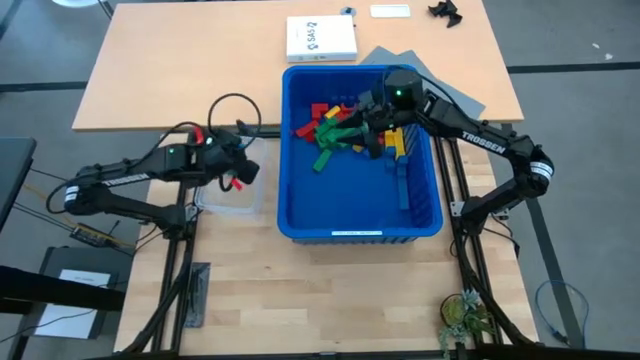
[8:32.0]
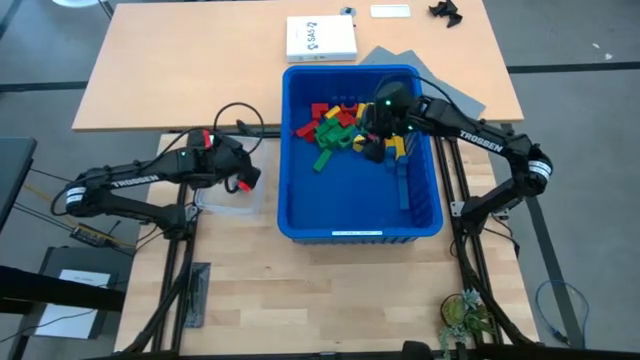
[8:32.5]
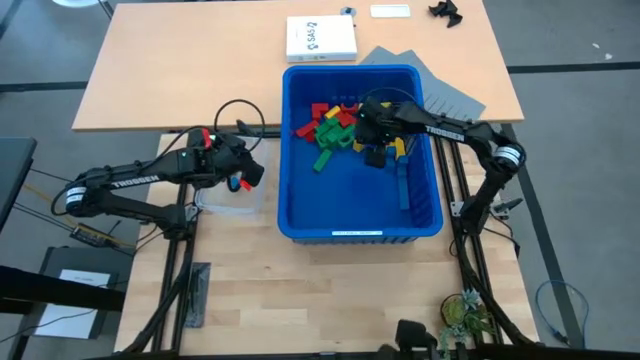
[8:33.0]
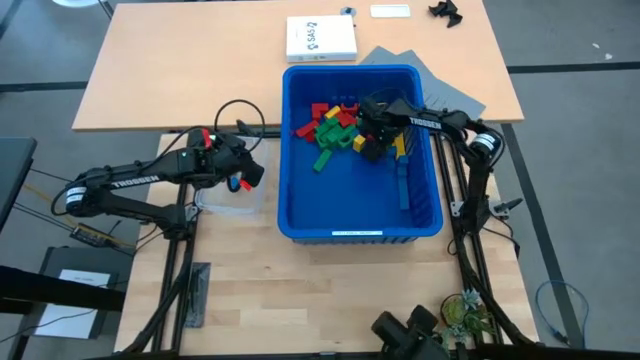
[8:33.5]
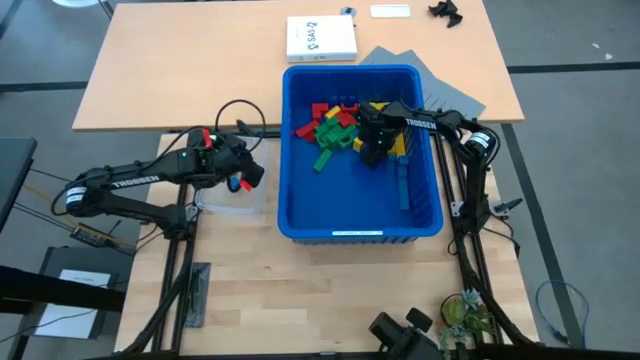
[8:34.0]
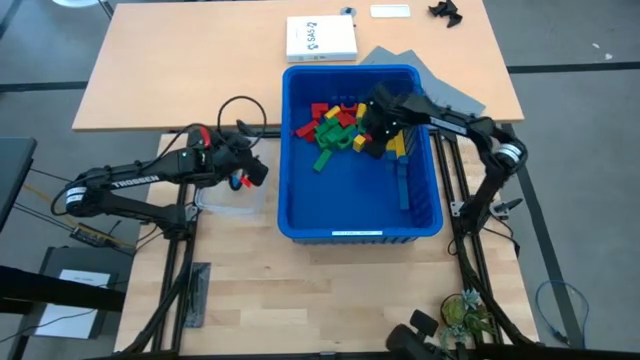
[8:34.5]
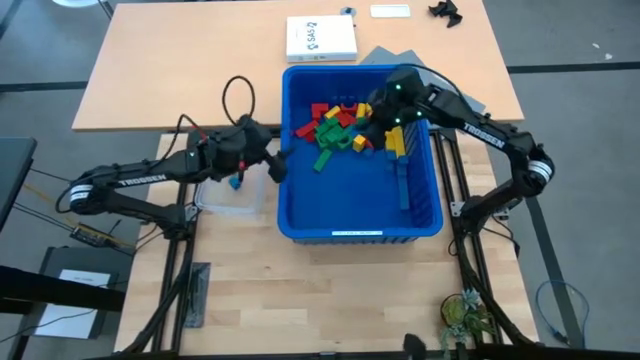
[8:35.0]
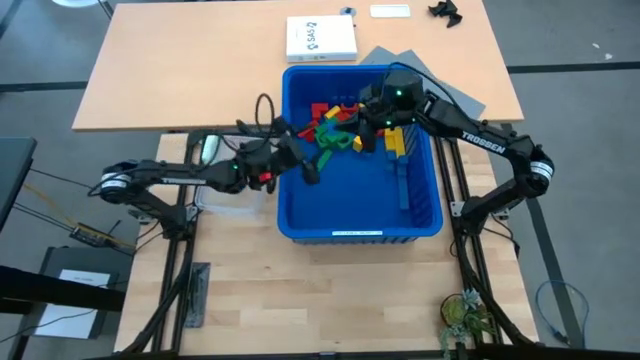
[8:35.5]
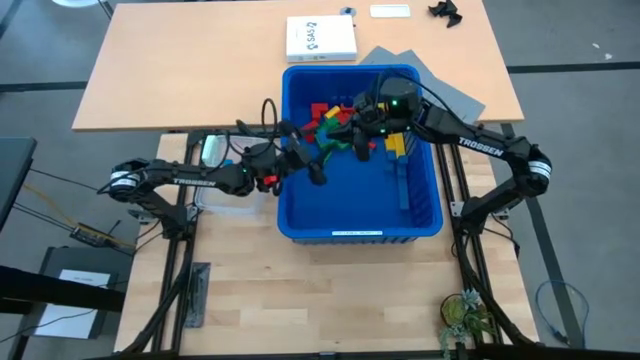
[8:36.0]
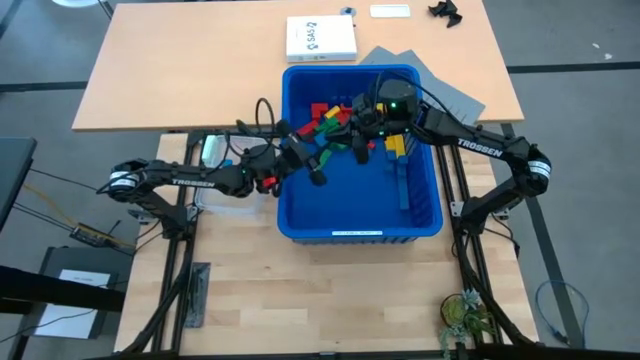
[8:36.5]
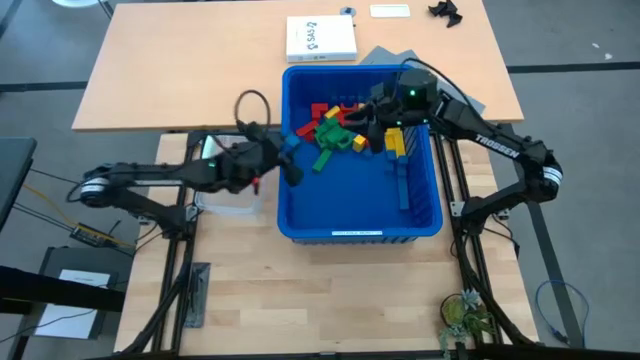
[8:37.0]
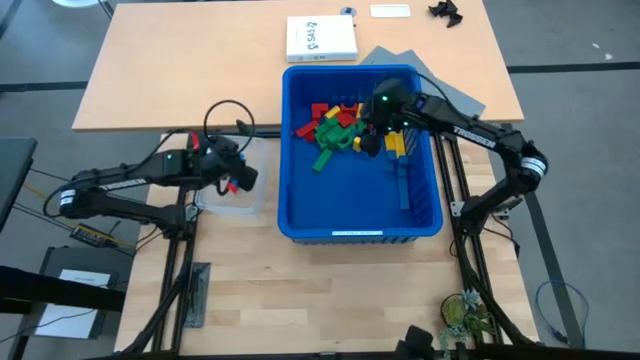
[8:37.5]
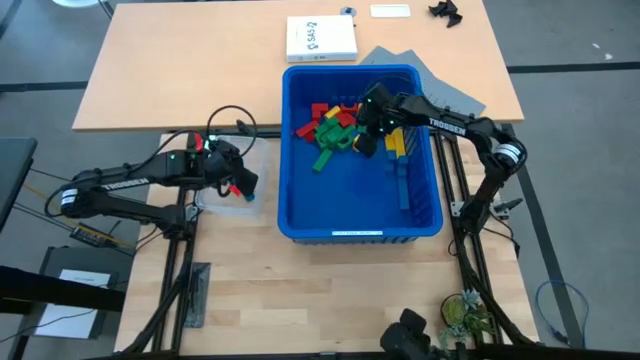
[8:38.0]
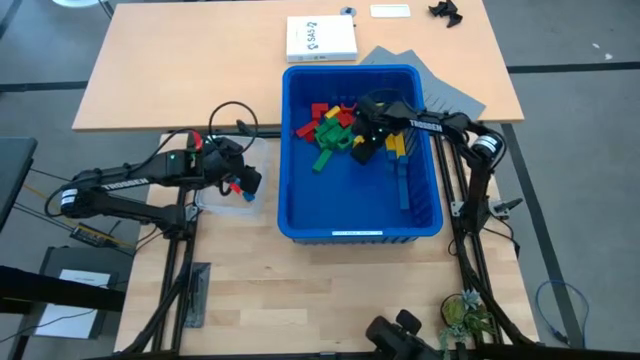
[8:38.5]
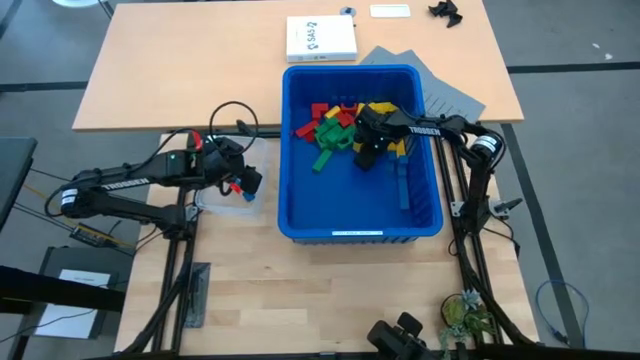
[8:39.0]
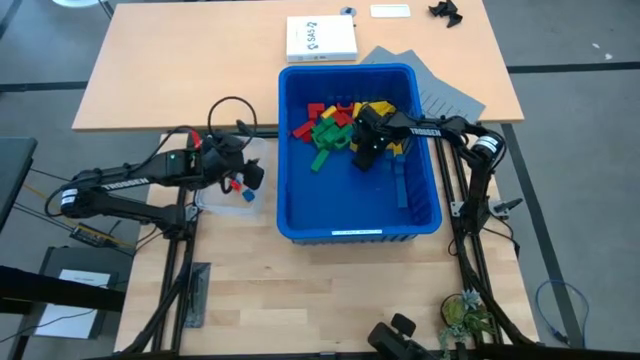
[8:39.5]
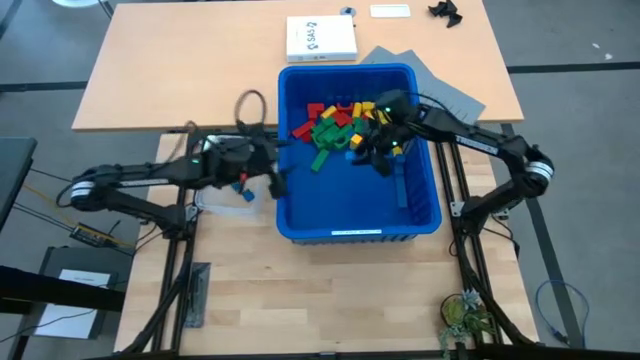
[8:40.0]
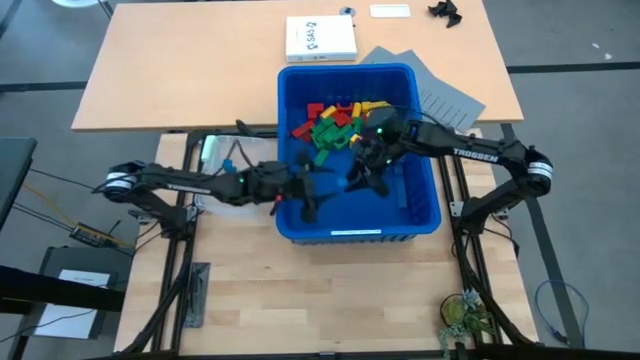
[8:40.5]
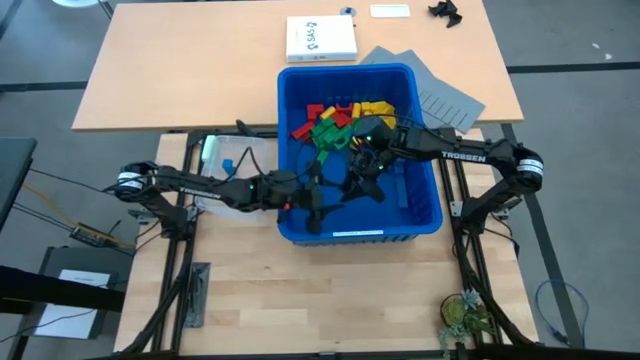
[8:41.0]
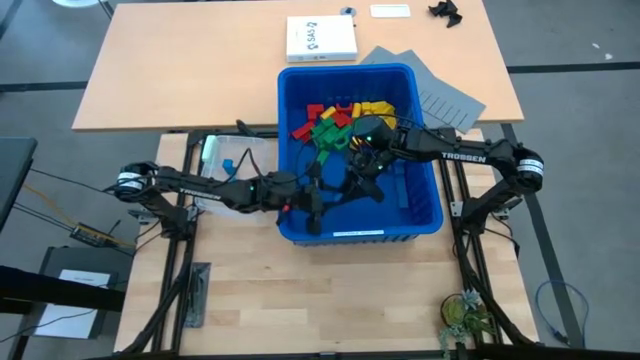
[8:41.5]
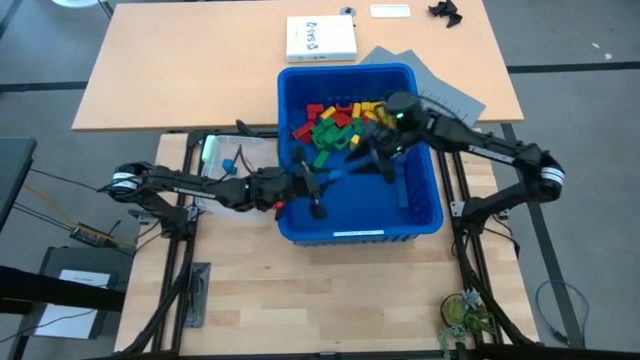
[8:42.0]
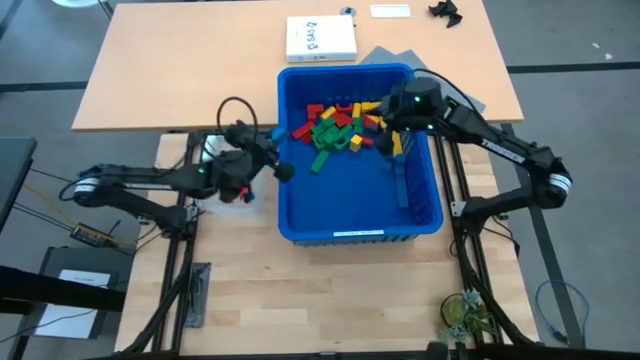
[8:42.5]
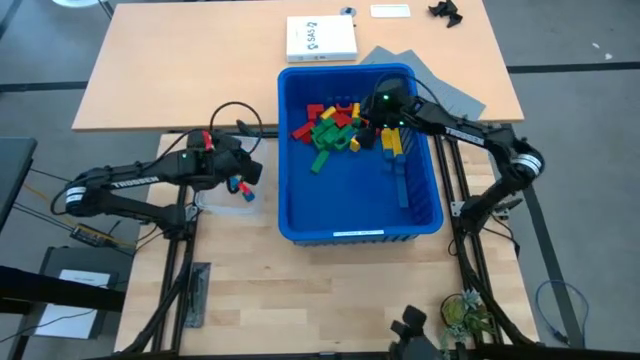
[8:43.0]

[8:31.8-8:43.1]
Task: Sort blocks
Remove the blue block from the blue bin and place it into the transparent bin

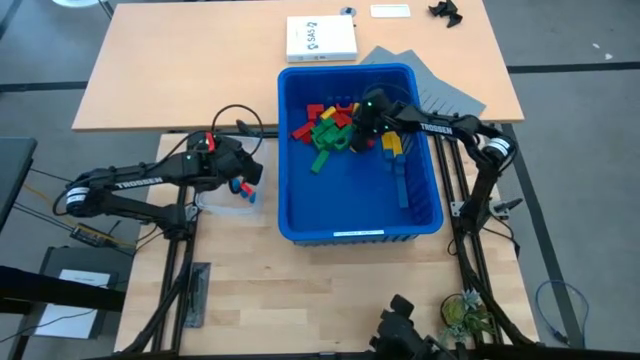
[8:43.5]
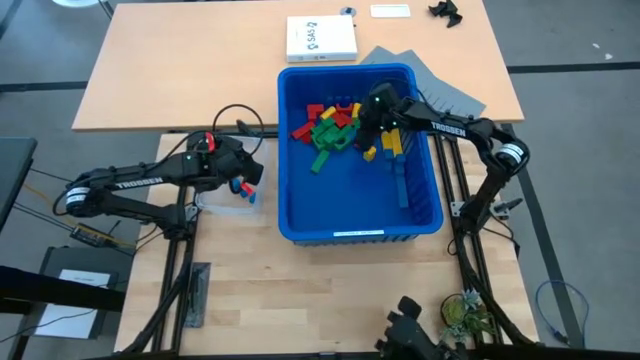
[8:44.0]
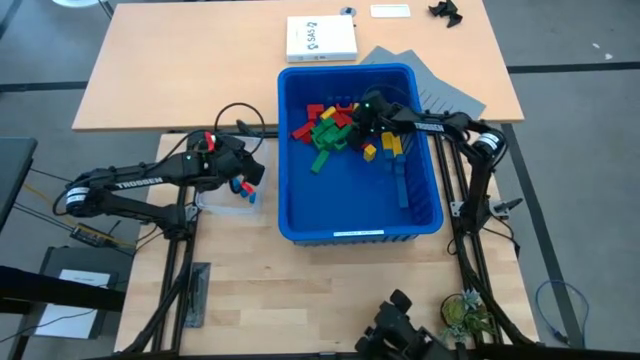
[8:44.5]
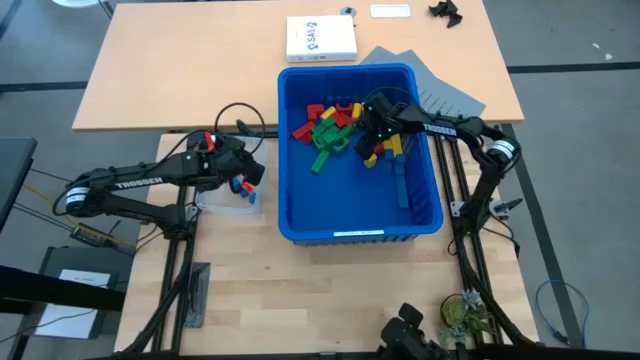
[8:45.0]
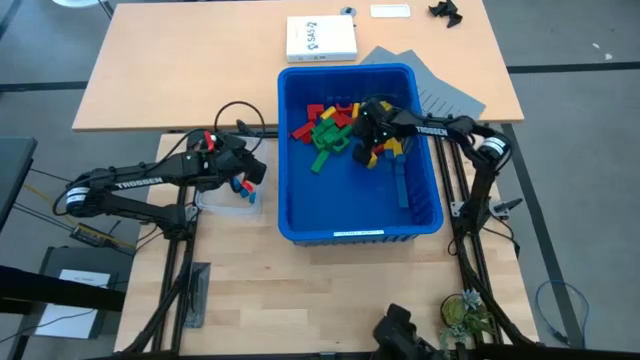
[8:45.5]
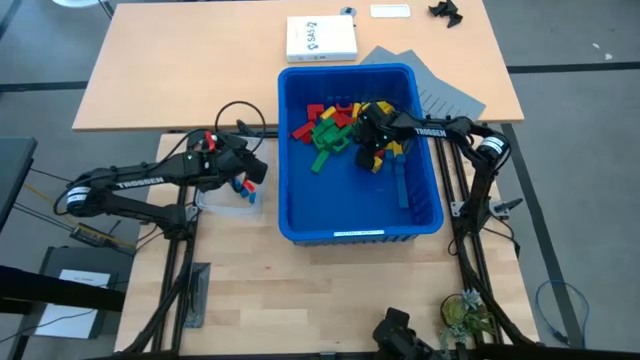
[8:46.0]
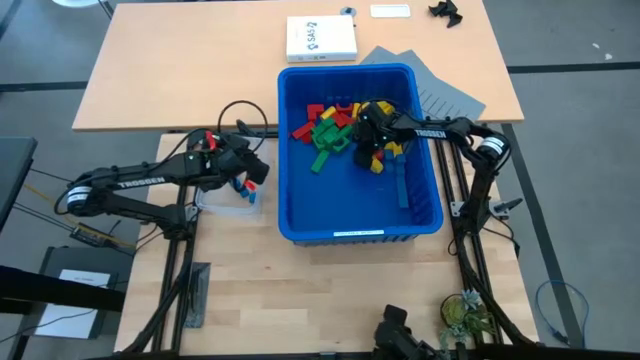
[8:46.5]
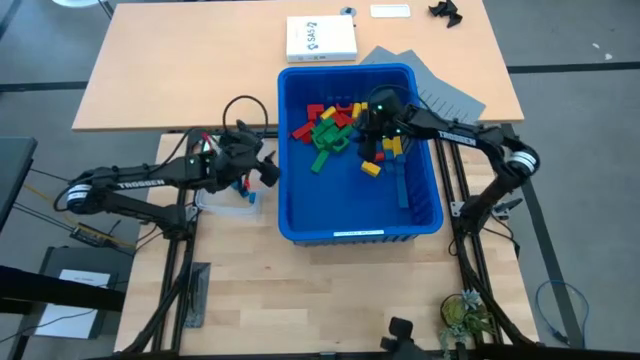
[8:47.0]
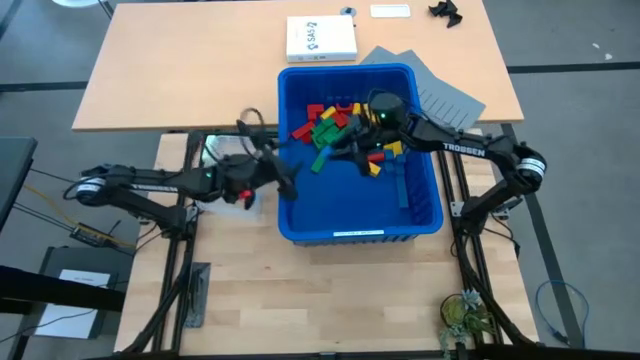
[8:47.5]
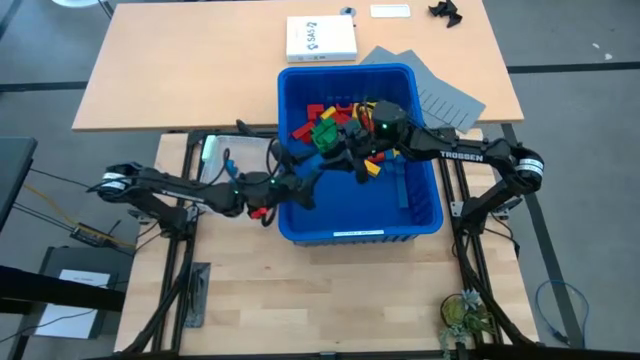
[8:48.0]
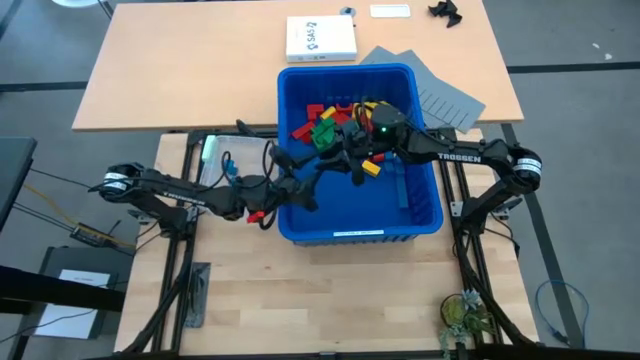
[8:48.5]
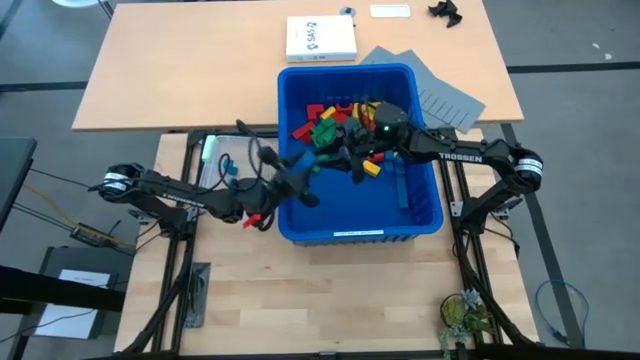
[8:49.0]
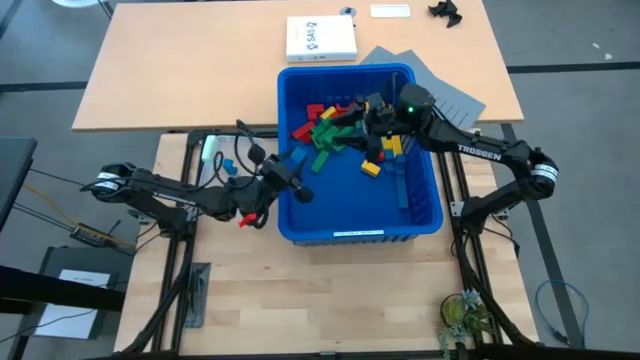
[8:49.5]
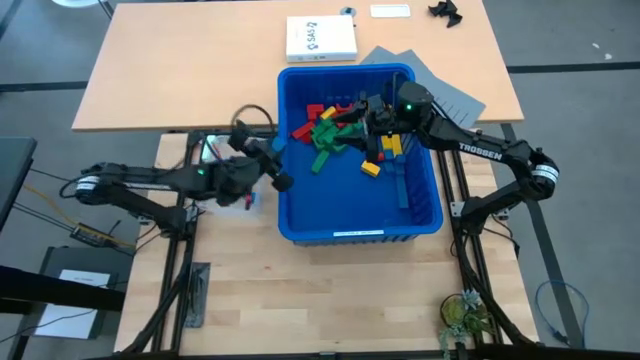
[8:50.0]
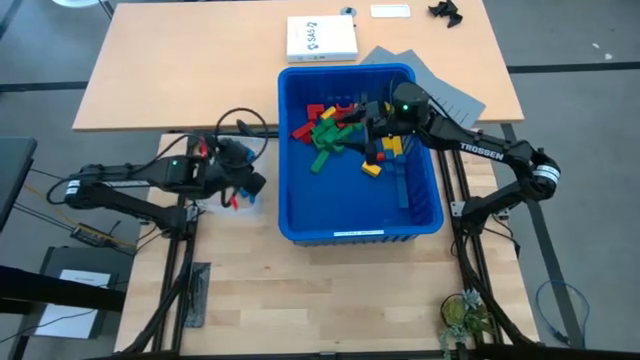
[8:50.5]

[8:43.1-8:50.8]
Put the blue block into the transparent bin
